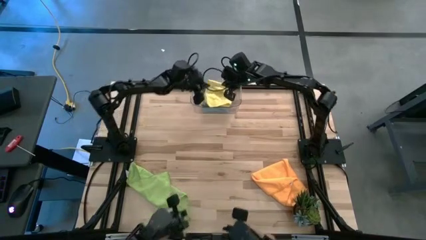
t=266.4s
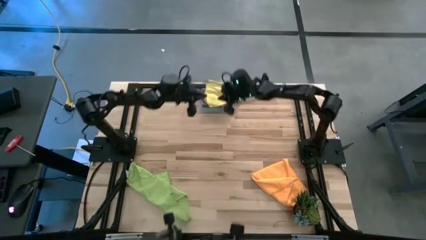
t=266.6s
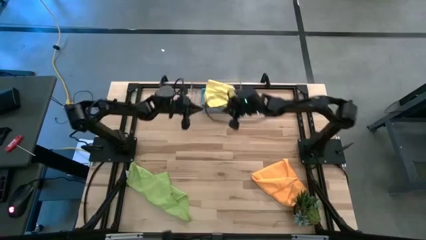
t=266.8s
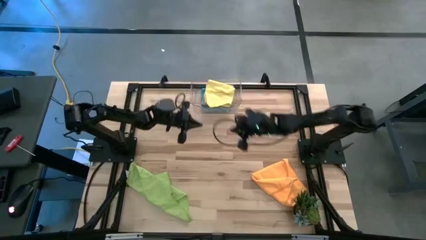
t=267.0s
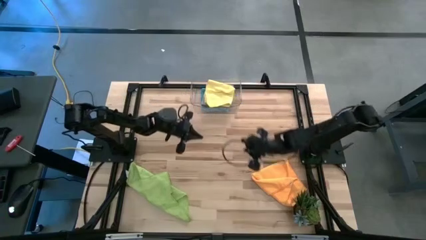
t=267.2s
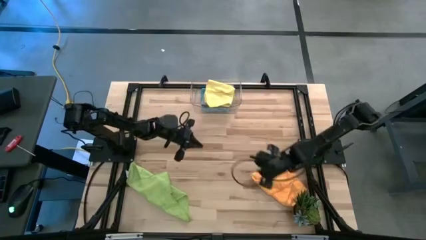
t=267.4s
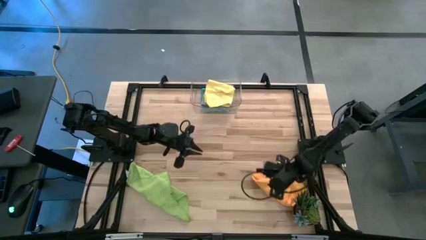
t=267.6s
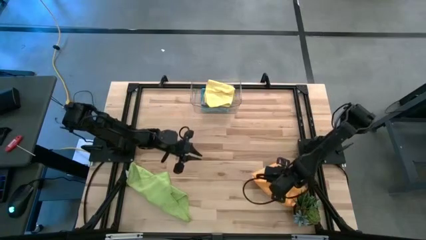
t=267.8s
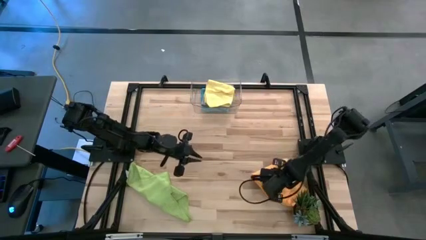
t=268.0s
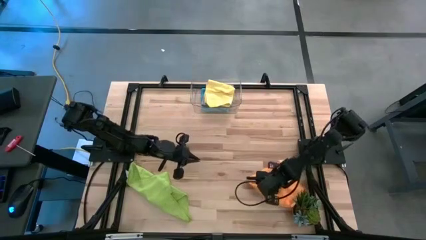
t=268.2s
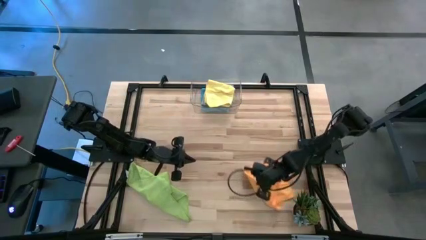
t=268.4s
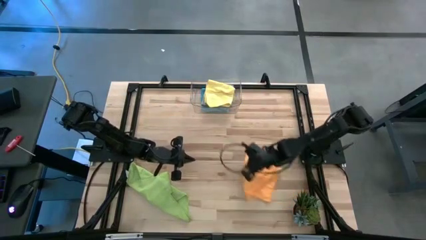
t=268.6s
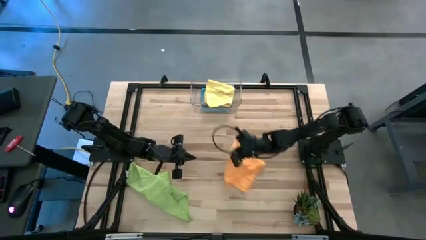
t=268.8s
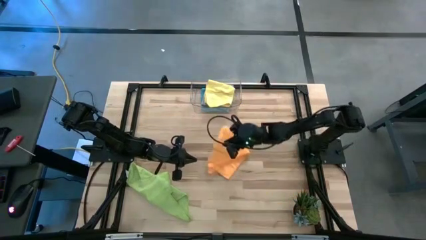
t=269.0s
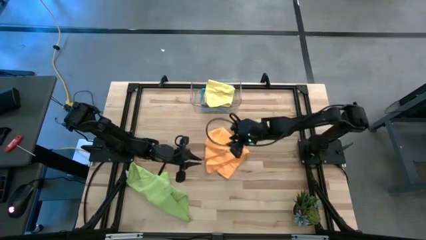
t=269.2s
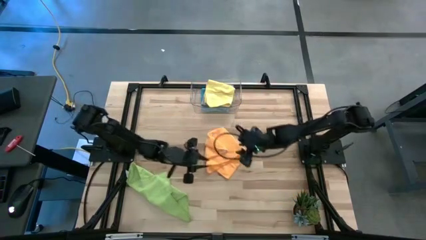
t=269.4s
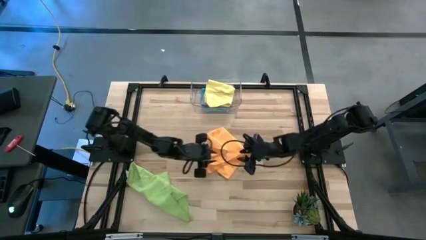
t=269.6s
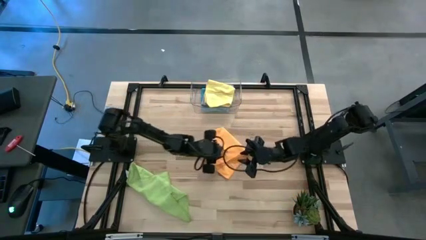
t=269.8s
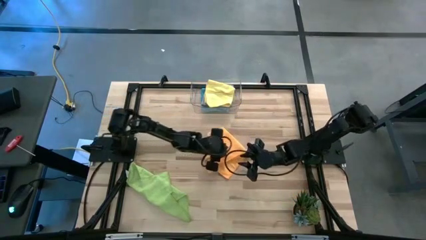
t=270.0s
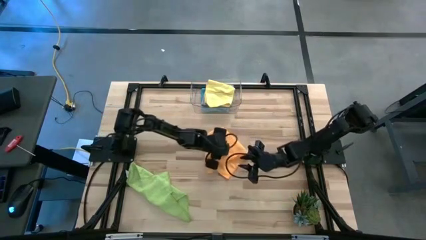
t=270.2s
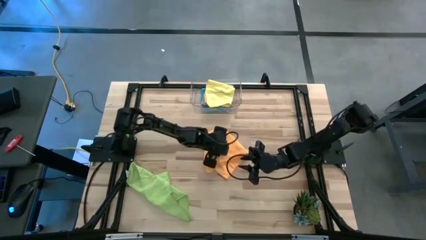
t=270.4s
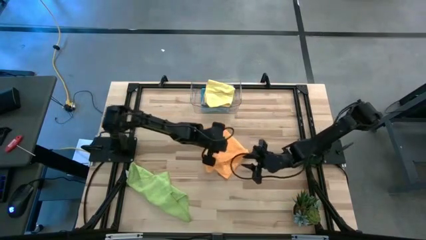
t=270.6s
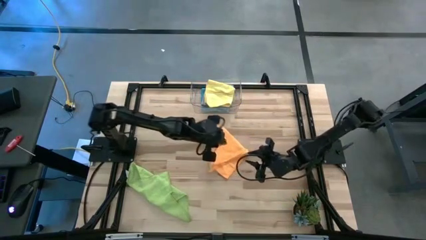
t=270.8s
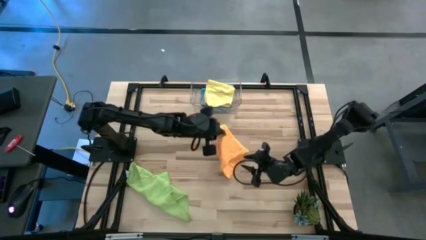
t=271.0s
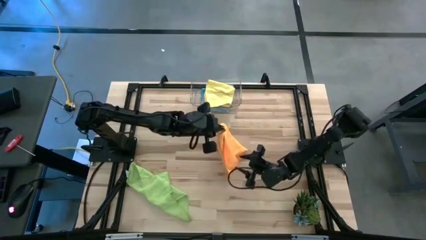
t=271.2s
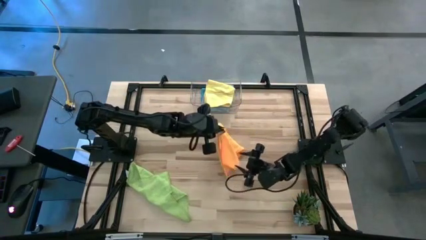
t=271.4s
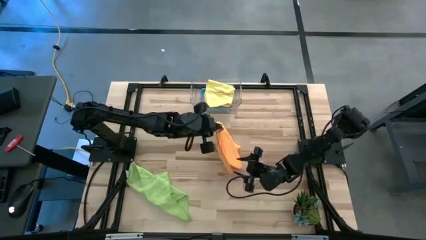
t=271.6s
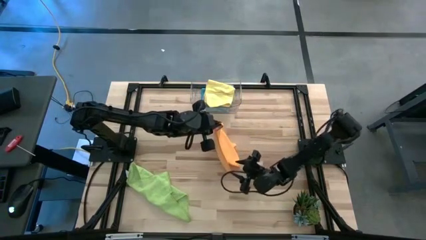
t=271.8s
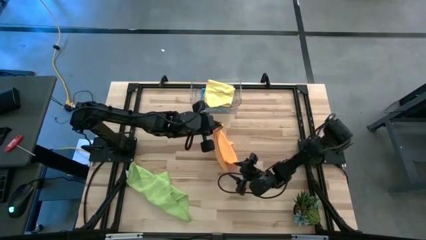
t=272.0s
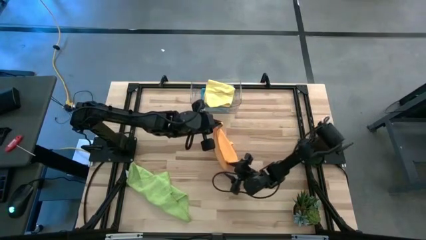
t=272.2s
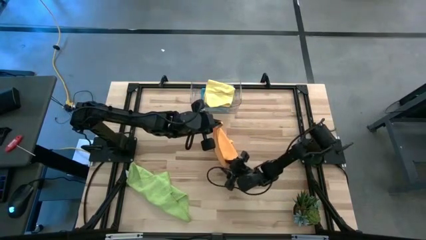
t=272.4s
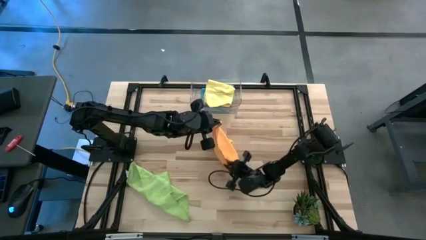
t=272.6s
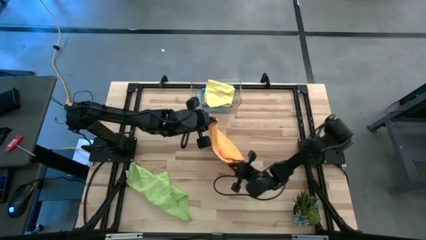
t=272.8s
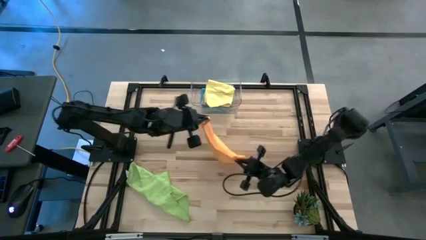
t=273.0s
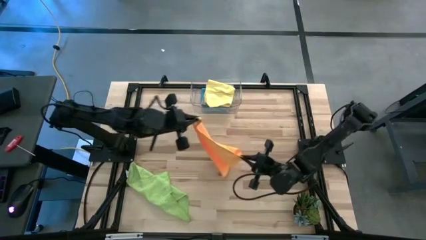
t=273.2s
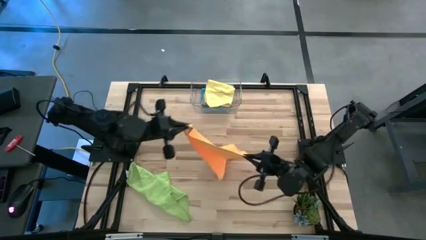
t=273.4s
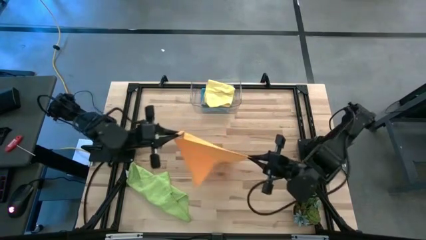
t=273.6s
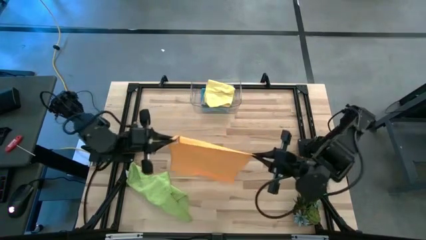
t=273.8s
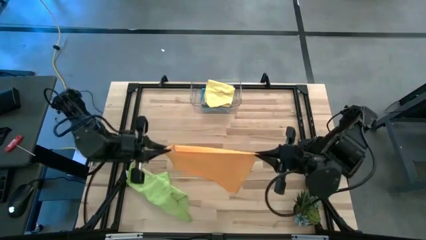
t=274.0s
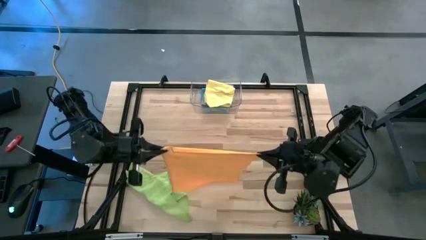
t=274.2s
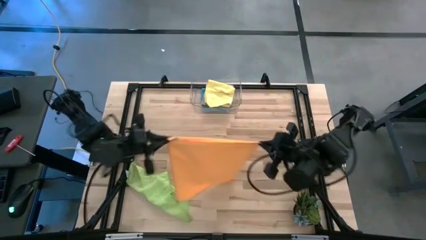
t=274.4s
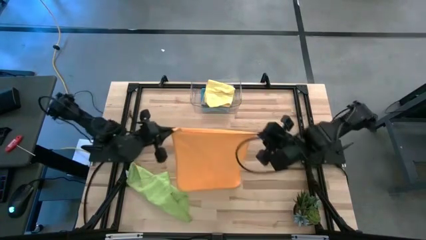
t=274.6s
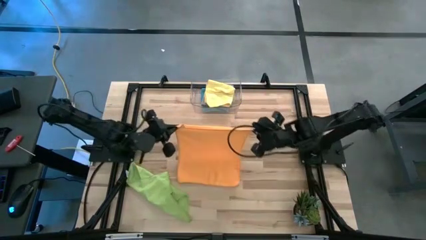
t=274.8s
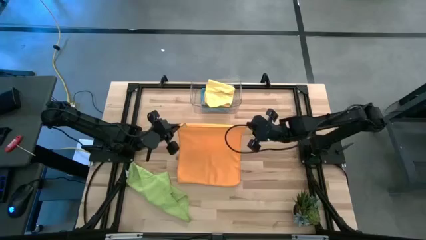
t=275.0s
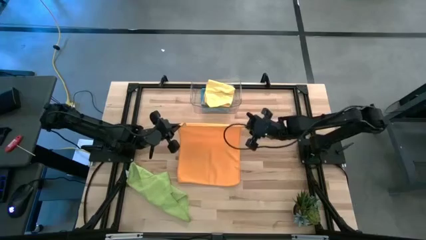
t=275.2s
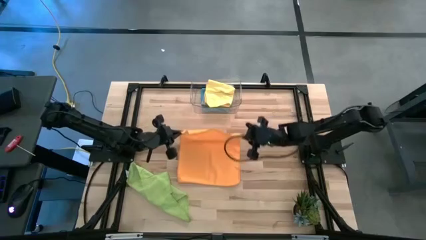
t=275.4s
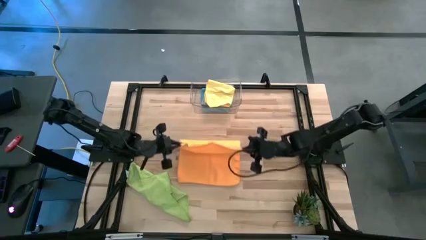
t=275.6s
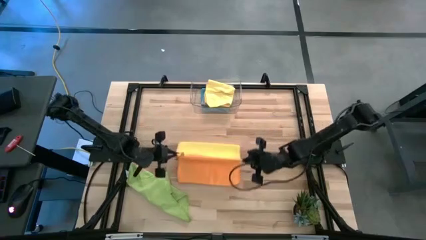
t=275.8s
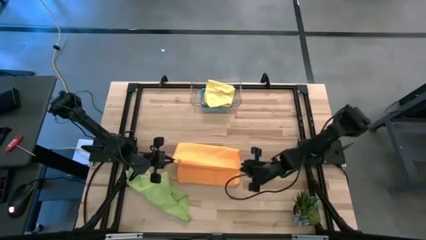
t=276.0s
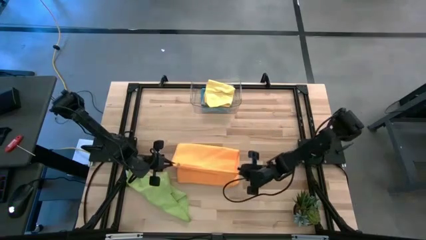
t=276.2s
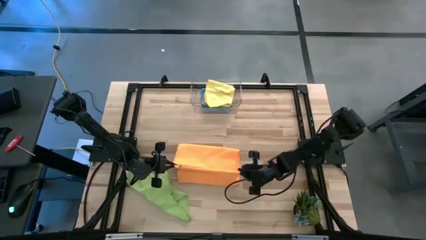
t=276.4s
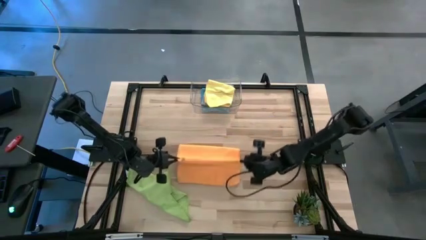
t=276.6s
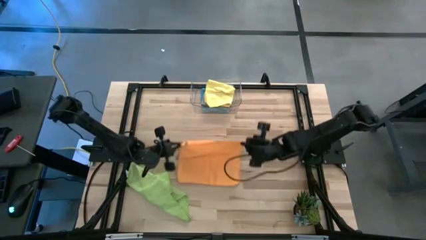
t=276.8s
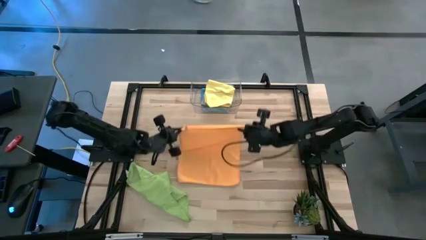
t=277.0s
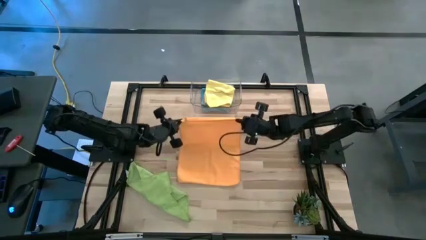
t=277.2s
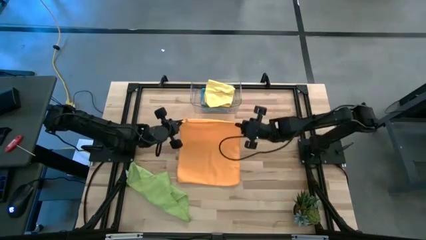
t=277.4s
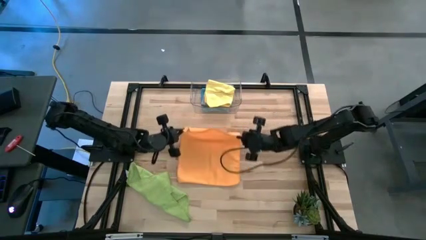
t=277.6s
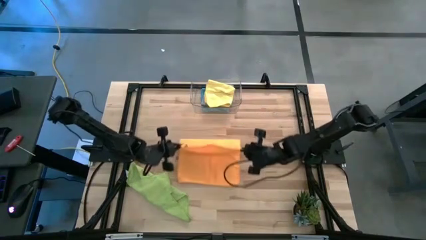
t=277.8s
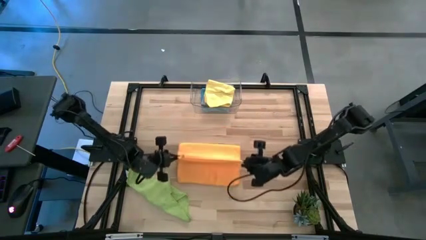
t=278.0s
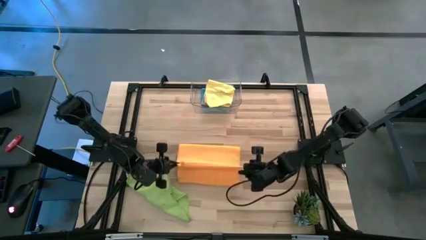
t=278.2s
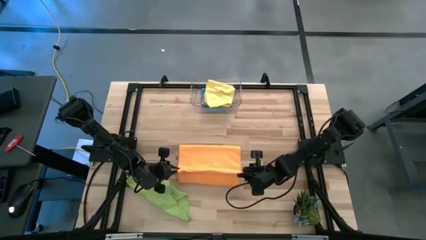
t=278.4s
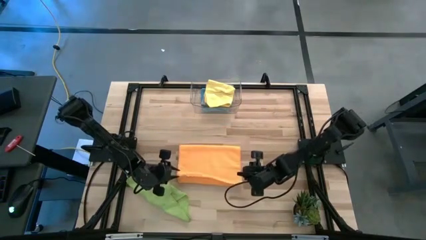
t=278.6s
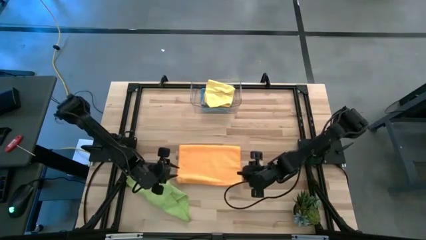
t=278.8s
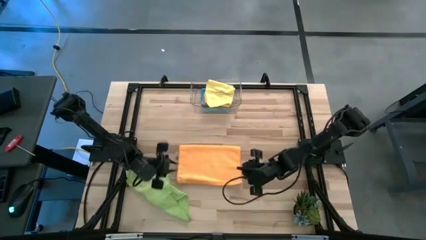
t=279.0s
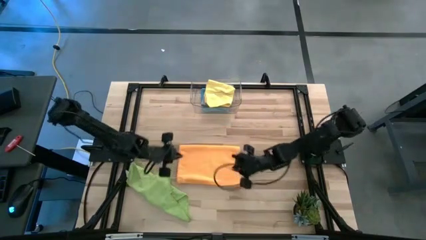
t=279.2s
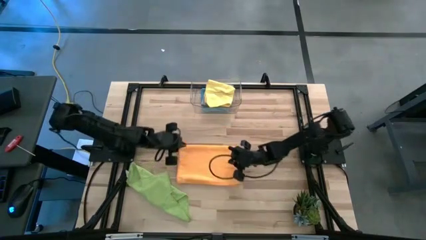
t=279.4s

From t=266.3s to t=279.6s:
Task: Fold microfiber towels
Fold the orange towel

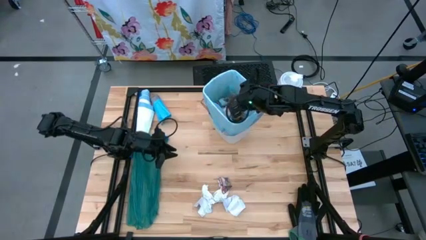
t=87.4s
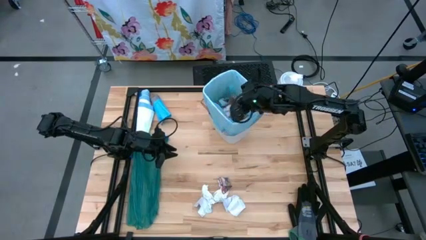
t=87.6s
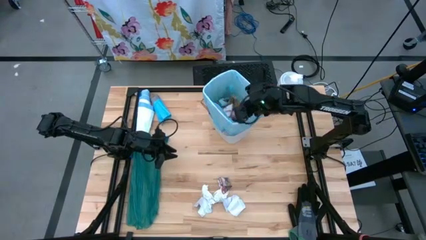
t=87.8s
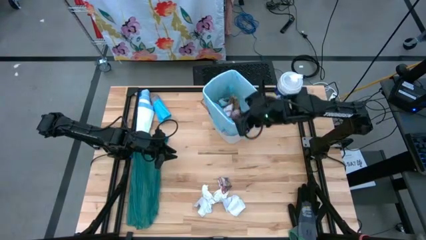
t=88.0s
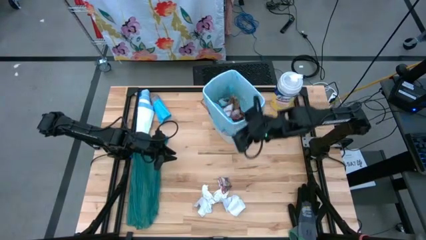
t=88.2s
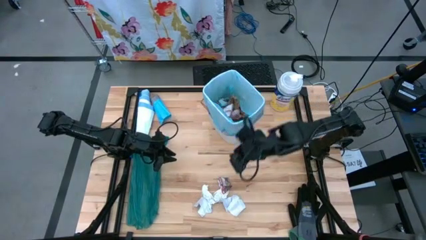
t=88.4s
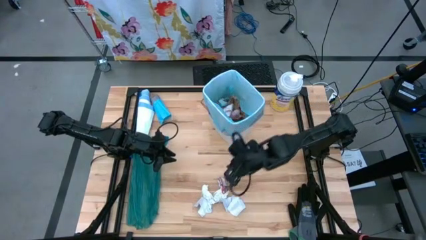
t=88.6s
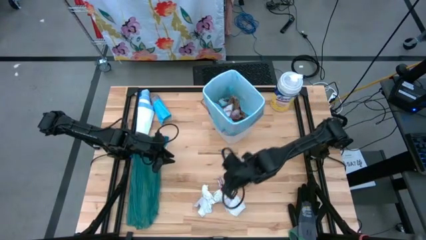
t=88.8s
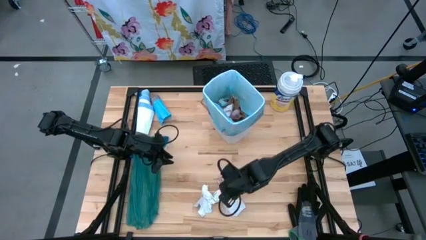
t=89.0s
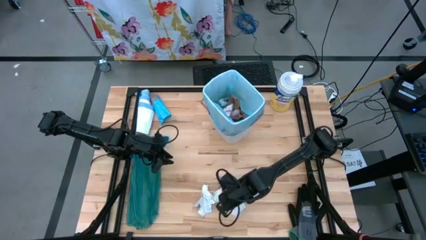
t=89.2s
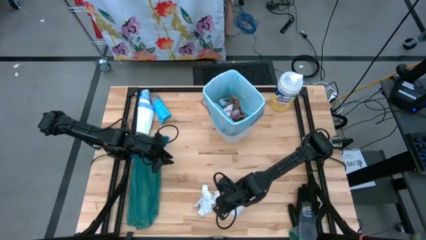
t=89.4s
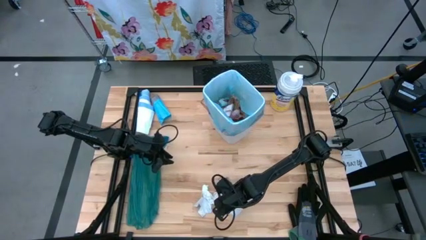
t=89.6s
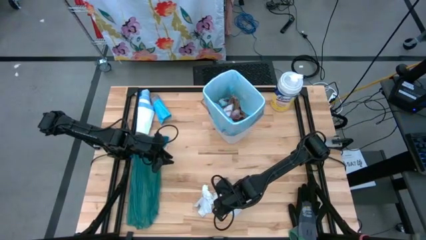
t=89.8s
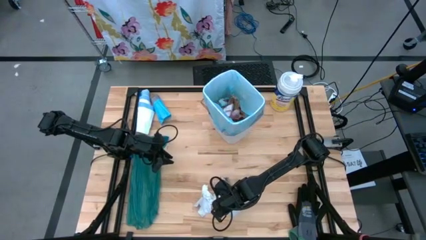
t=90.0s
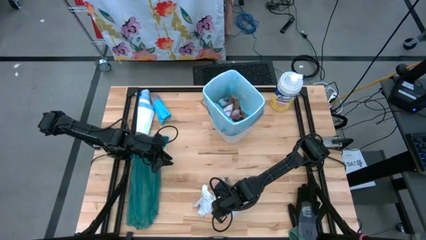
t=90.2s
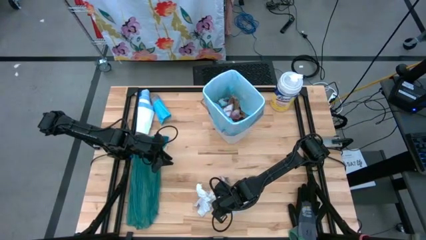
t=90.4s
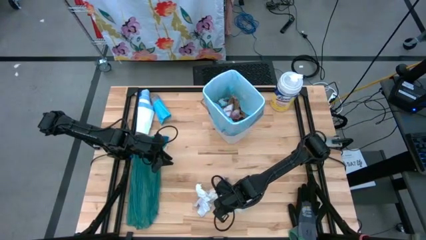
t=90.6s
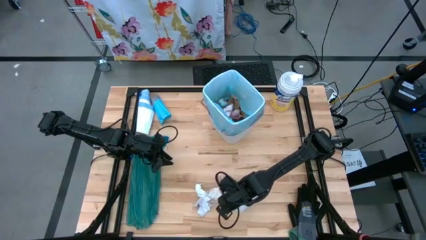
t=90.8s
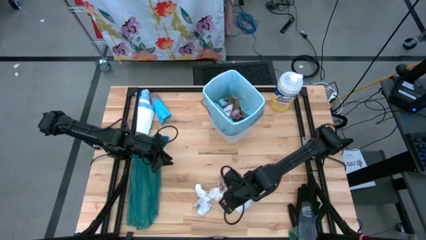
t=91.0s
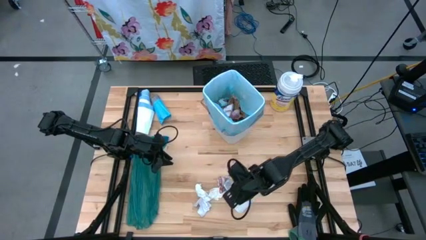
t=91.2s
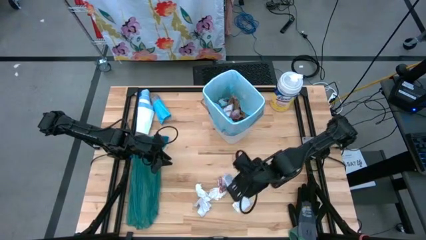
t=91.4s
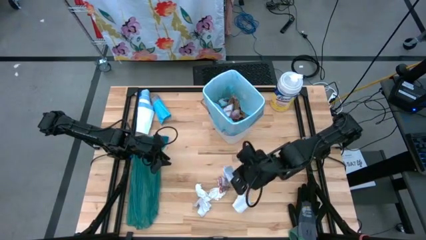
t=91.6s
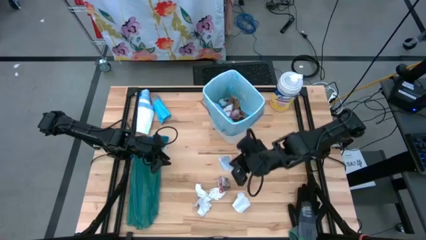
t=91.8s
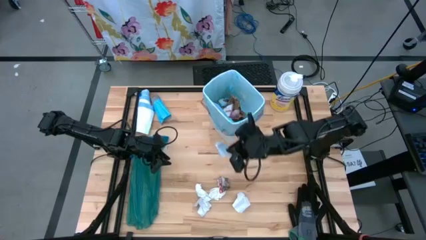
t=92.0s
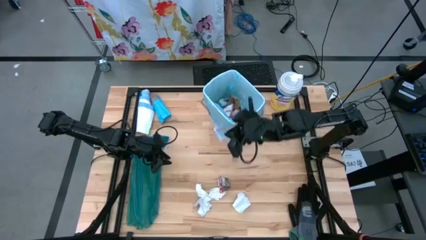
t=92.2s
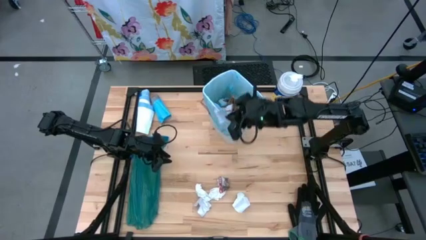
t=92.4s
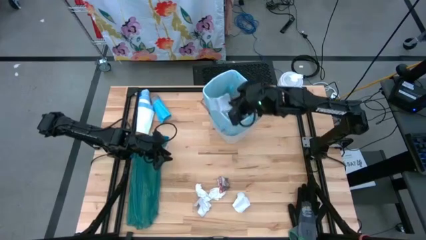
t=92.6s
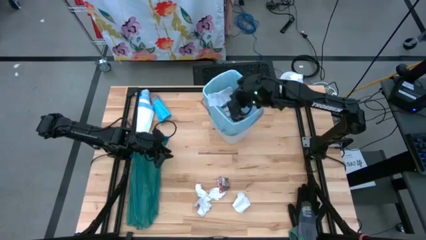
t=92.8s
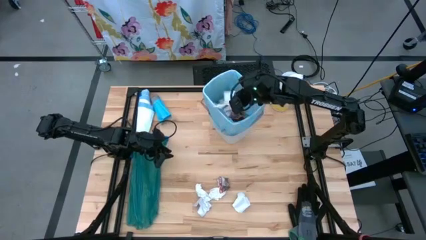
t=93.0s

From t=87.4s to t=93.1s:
Task: place trash/remove bag and relplace
Put the white paper into the trash bin
